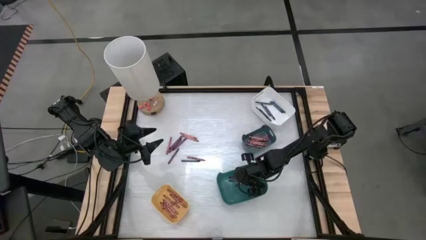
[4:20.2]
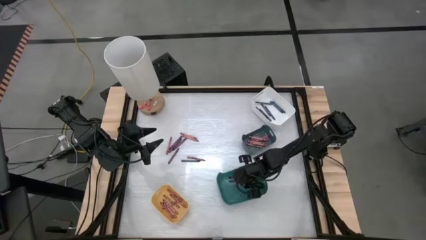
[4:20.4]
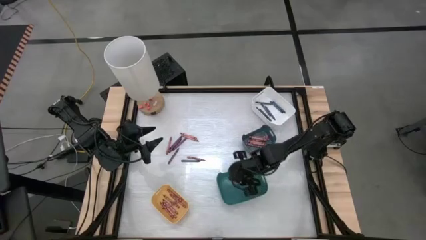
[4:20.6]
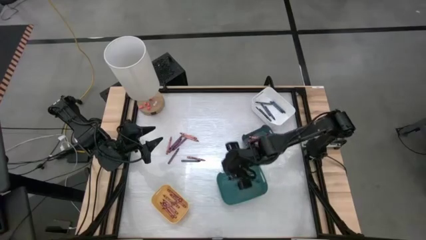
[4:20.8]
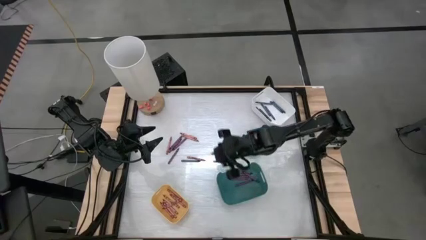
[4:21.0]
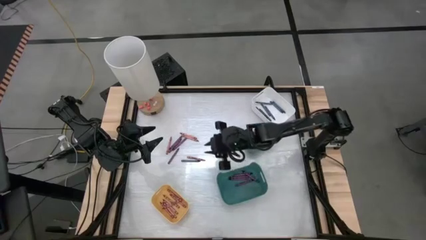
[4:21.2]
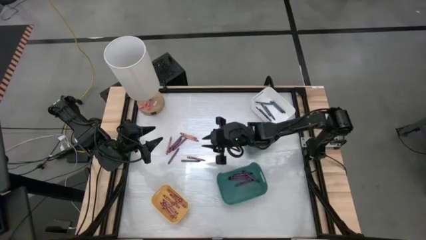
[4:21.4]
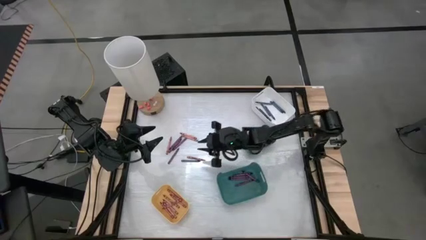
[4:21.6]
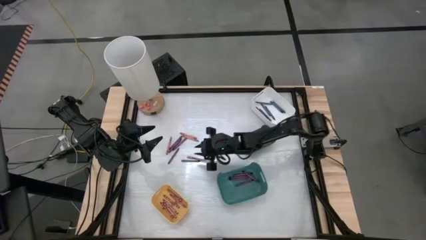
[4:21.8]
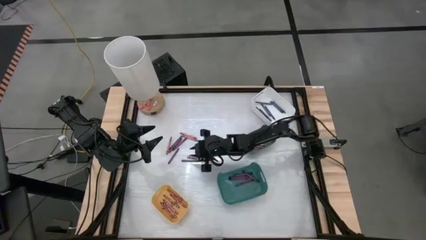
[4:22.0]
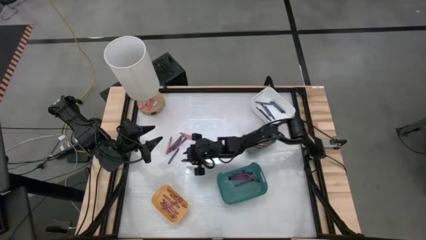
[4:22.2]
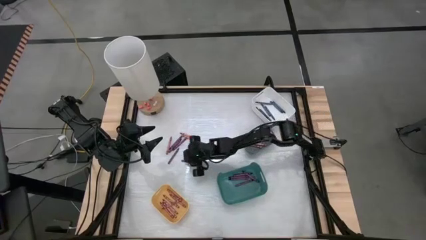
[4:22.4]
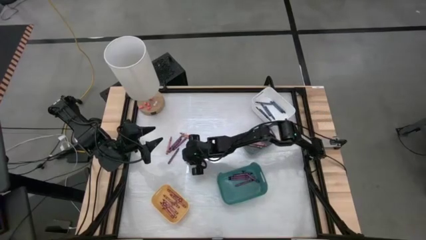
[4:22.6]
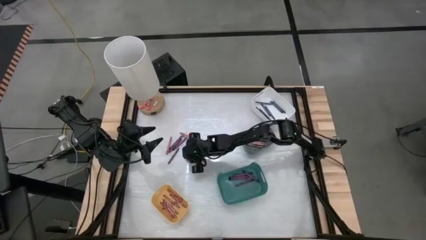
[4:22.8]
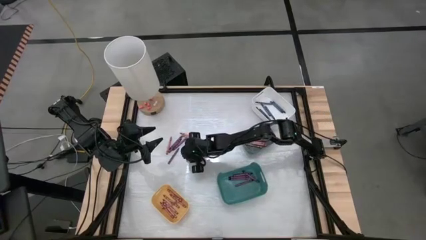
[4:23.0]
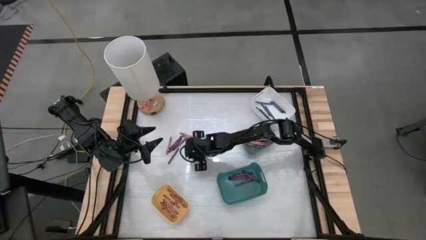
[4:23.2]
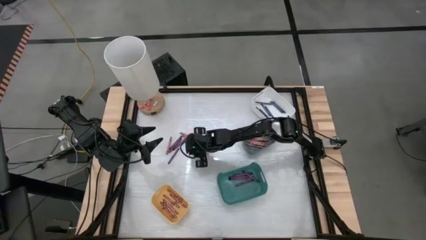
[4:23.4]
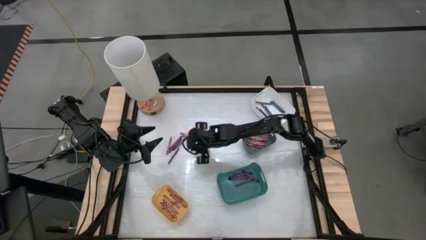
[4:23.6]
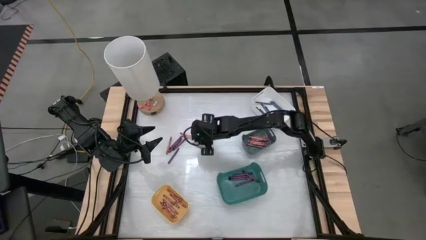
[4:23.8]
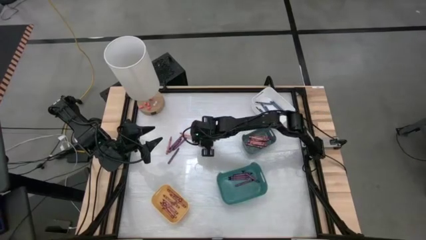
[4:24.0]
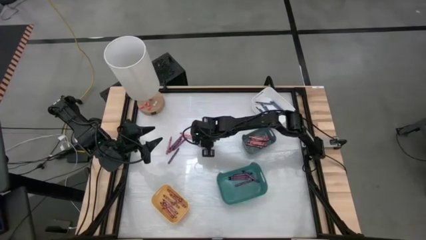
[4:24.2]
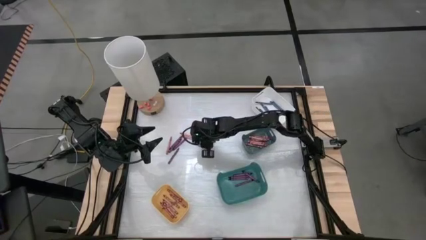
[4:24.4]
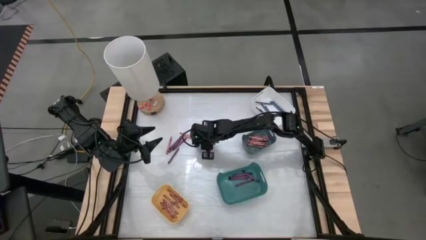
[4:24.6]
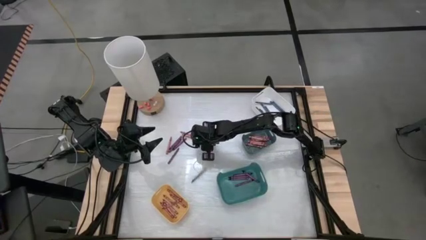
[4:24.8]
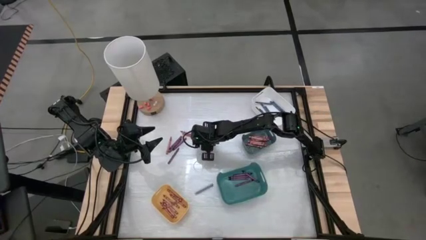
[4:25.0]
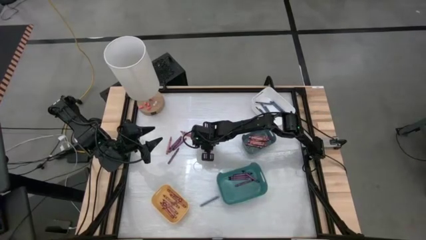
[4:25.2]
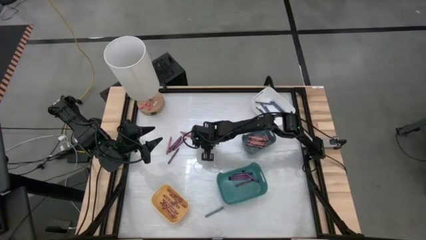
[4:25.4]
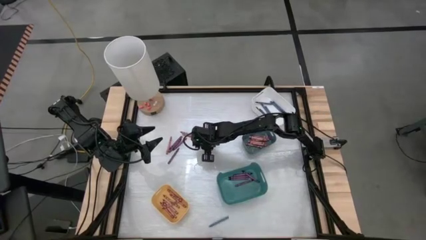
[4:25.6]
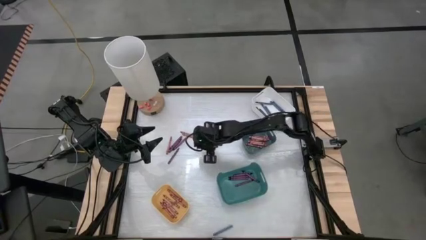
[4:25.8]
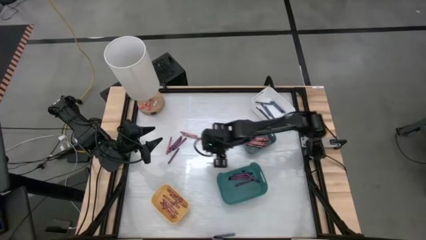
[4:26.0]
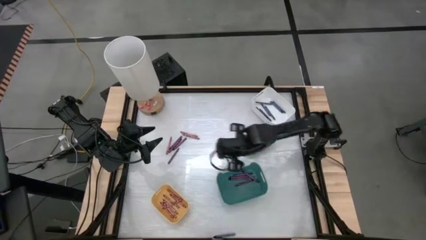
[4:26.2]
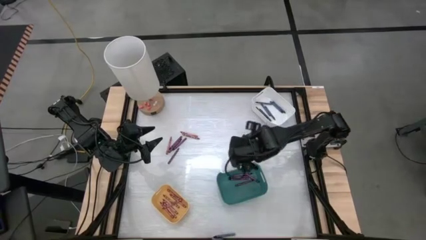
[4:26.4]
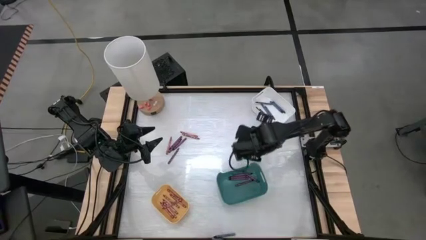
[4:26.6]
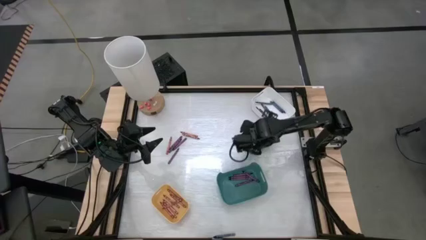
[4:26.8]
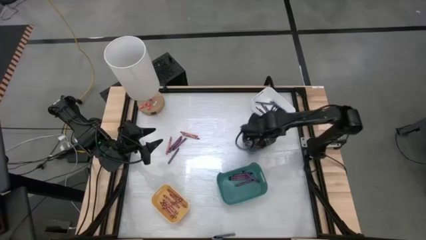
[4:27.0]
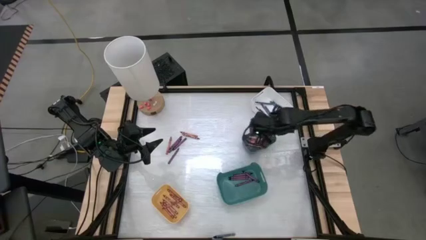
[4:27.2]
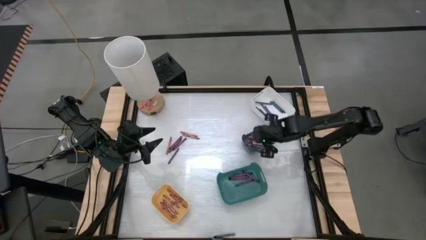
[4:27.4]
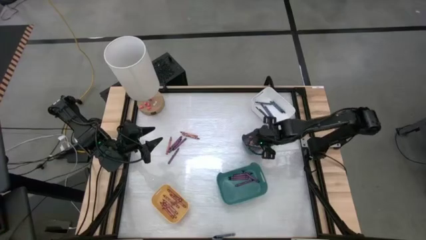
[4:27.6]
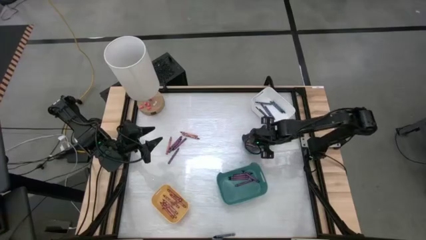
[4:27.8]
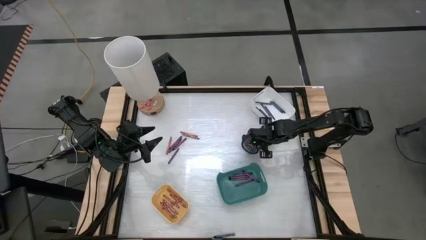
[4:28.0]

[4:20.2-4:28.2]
Task: Sort crayons
Put the pink crayon into the dark blue bin

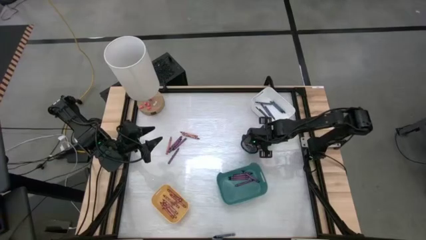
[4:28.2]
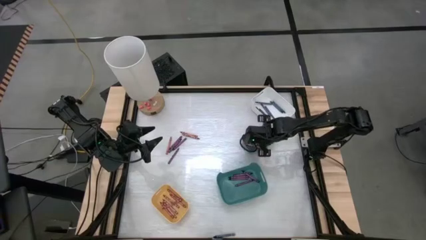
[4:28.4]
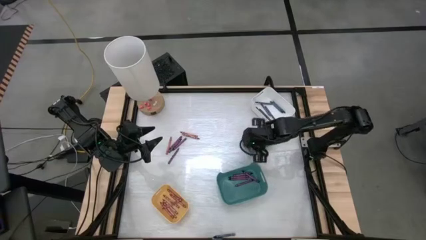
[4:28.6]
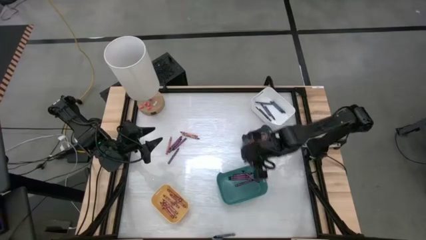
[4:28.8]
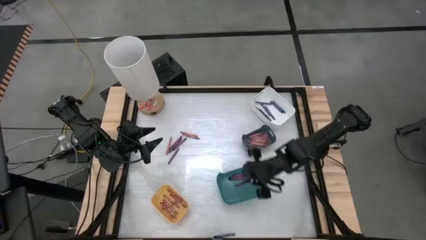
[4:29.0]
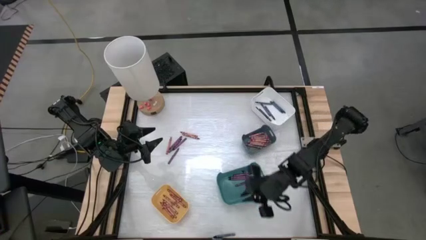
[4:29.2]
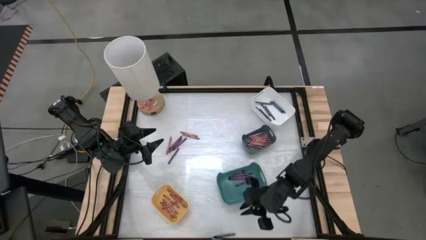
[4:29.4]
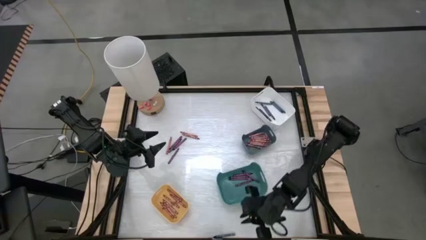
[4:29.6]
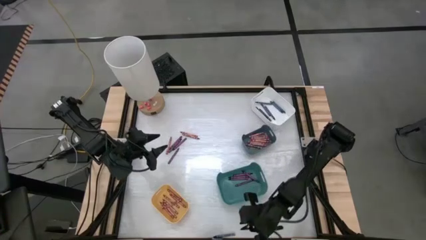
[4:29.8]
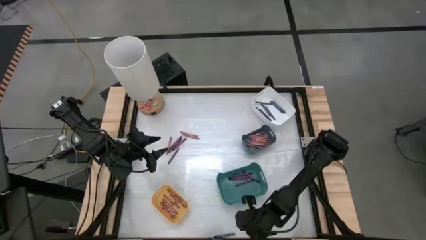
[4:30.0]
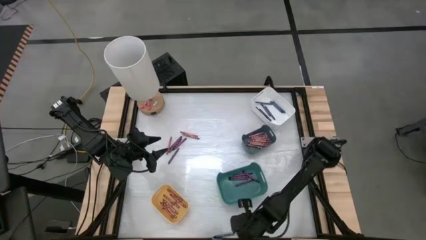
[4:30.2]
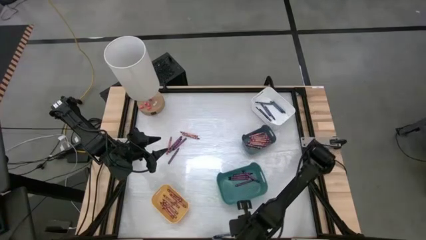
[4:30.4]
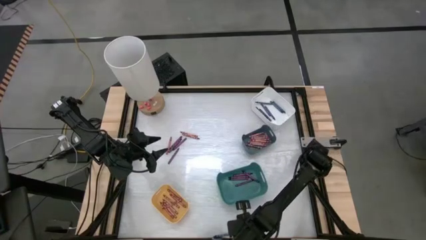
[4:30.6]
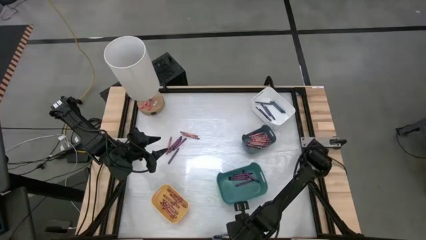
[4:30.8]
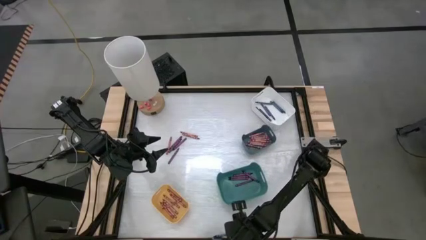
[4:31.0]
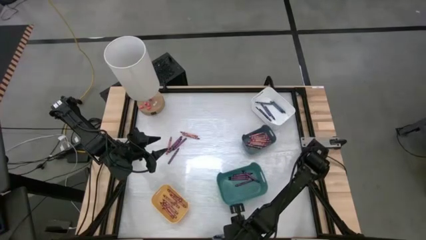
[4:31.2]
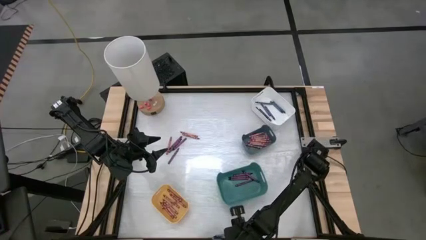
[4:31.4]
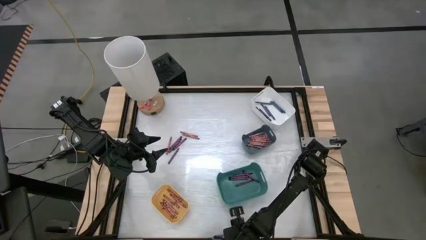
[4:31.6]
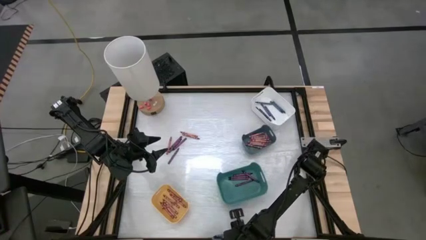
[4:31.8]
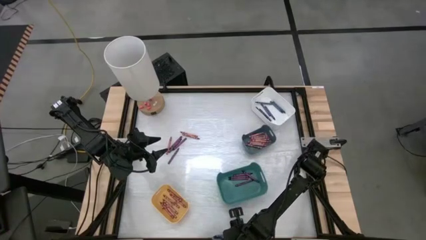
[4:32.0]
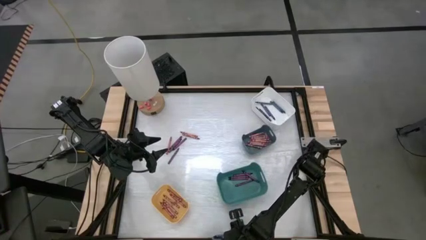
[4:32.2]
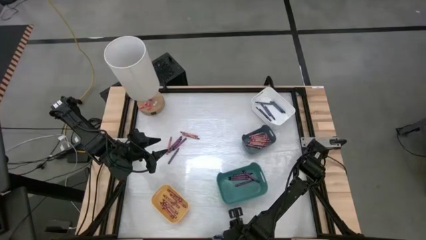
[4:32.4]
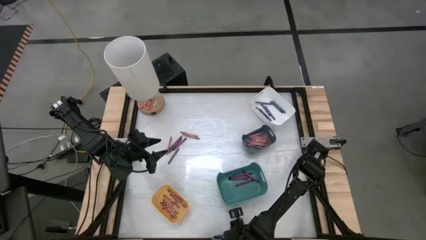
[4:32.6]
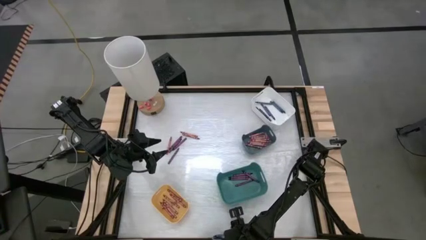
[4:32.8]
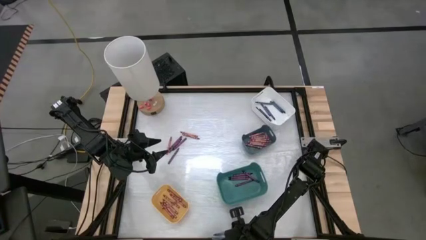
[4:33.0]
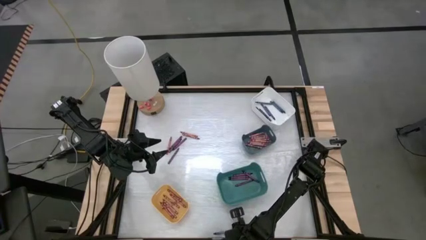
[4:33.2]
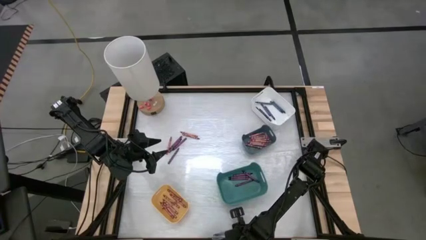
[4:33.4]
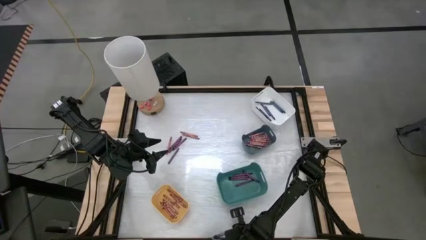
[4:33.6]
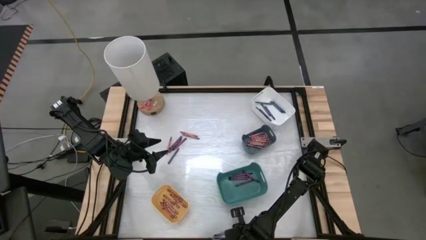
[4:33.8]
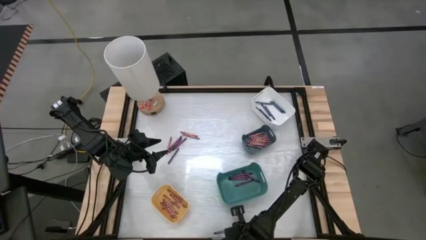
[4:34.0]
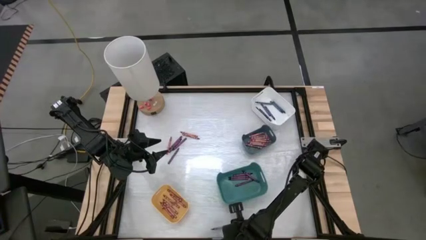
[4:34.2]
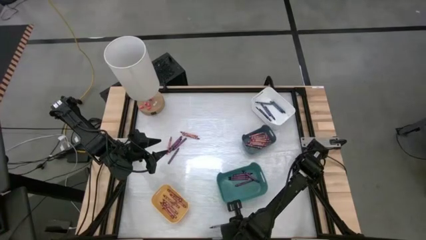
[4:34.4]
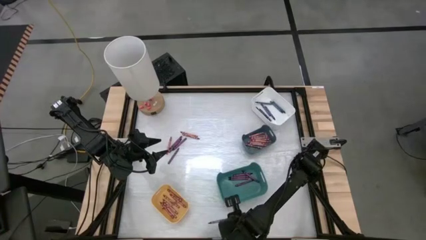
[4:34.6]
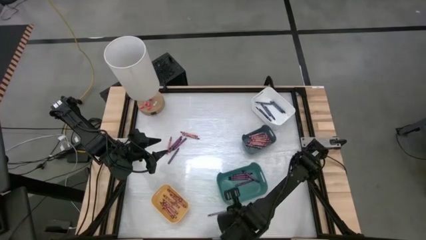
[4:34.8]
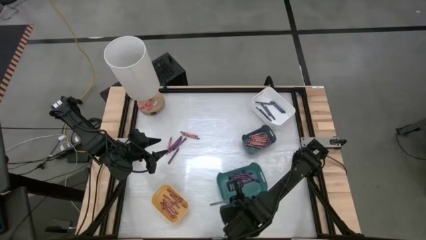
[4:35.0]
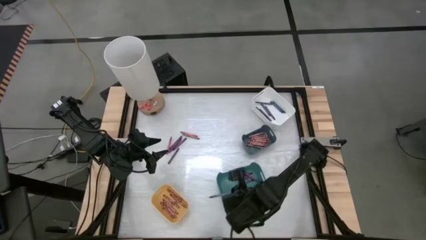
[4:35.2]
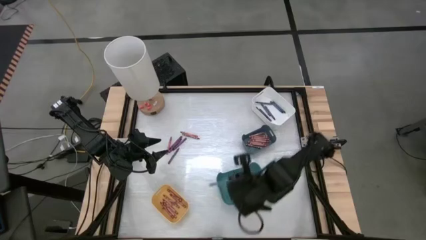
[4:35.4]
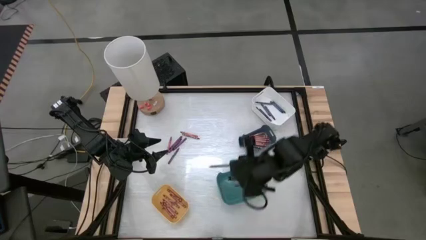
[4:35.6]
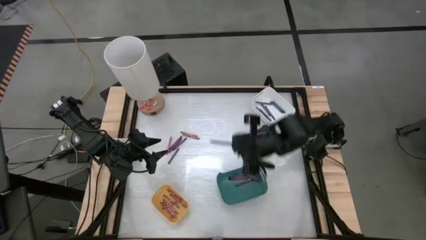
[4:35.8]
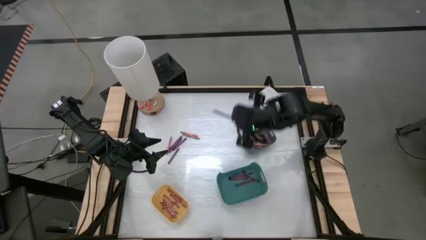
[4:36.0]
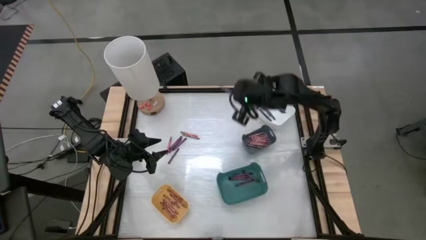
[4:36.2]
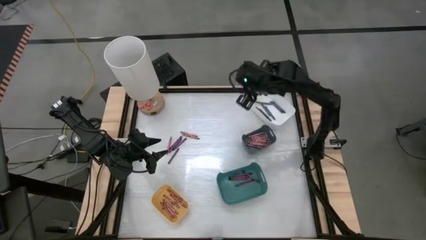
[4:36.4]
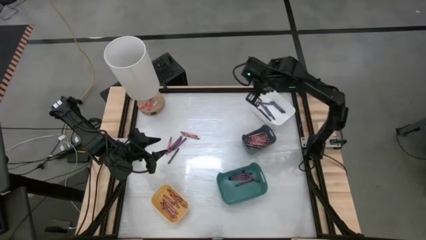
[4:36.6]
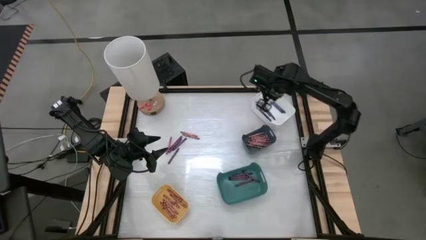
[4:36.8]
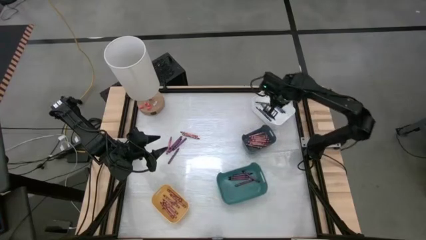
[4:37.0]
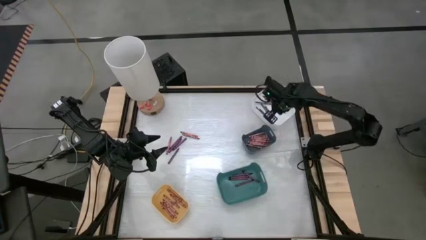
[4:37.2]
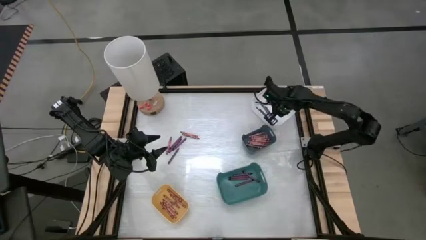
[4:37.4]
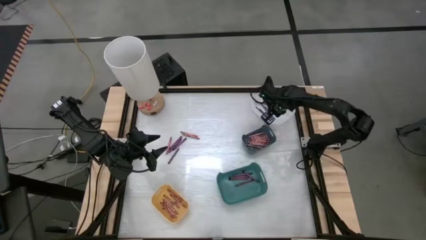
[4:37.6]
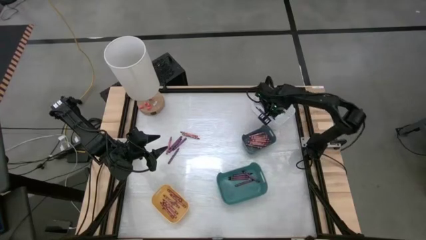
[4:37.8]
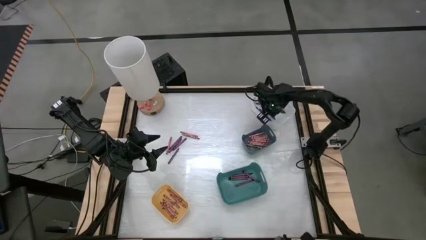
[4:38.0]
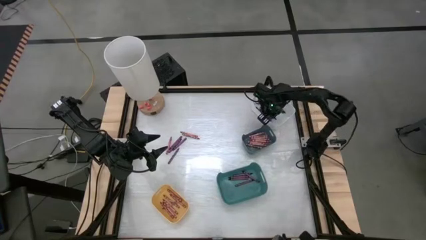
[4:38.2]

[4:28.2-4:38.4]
Put the blue crayon into the white bin
